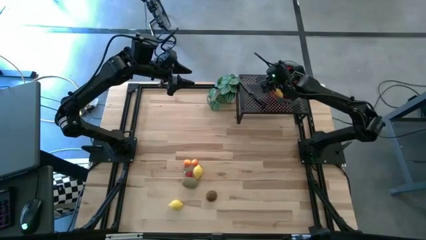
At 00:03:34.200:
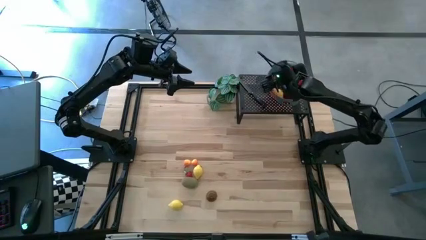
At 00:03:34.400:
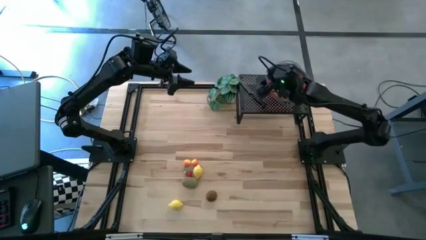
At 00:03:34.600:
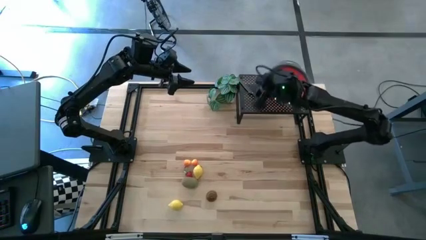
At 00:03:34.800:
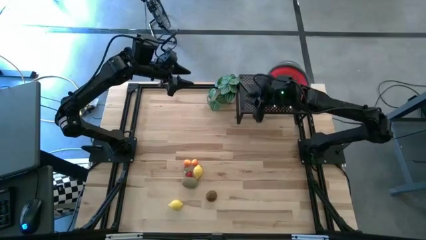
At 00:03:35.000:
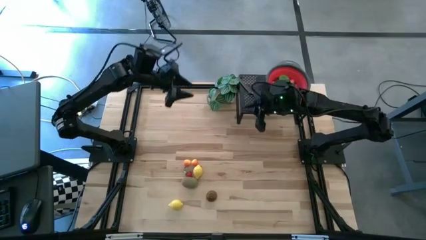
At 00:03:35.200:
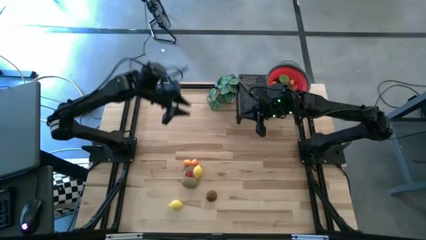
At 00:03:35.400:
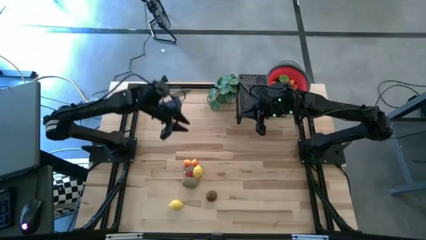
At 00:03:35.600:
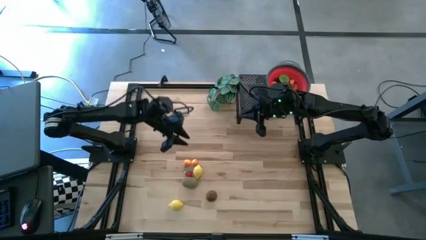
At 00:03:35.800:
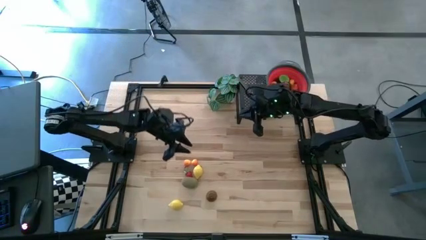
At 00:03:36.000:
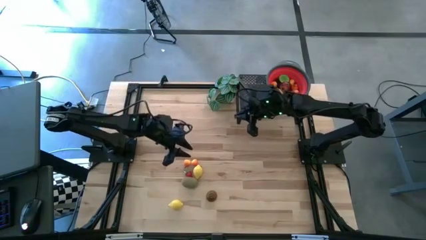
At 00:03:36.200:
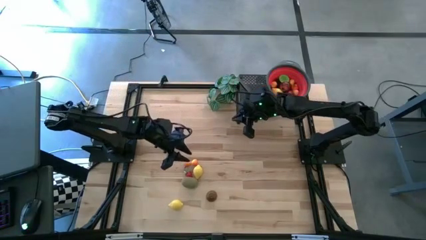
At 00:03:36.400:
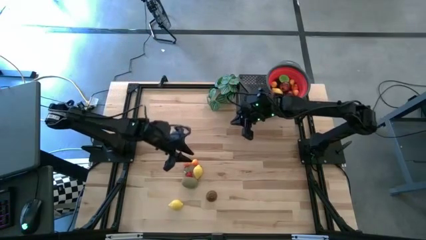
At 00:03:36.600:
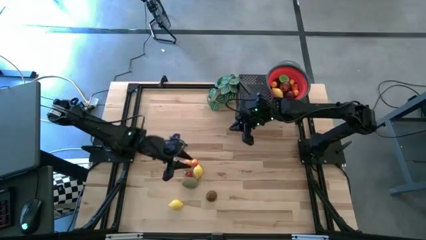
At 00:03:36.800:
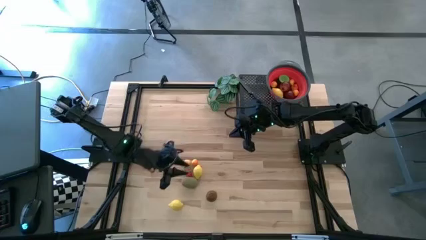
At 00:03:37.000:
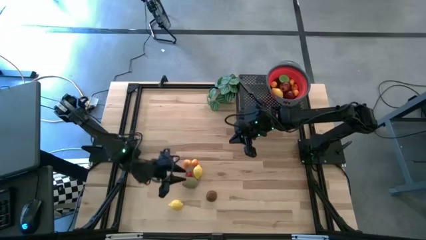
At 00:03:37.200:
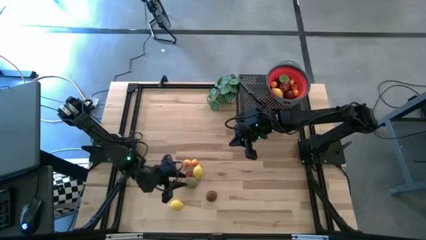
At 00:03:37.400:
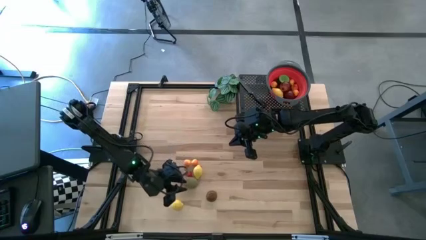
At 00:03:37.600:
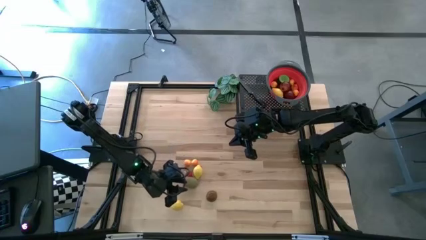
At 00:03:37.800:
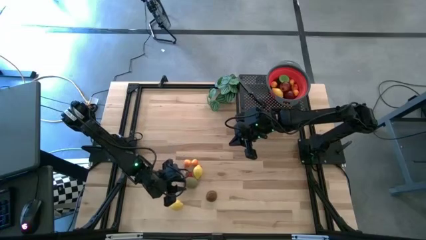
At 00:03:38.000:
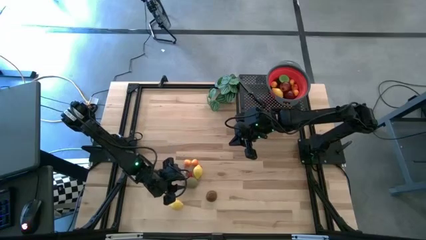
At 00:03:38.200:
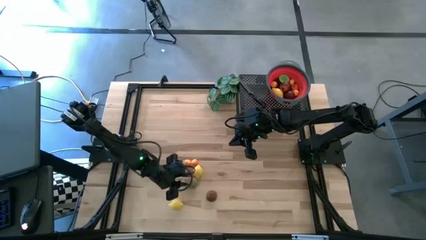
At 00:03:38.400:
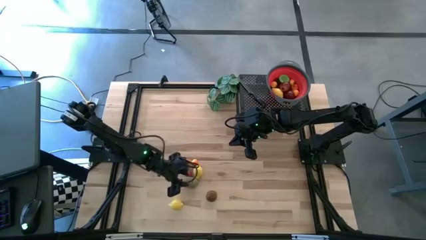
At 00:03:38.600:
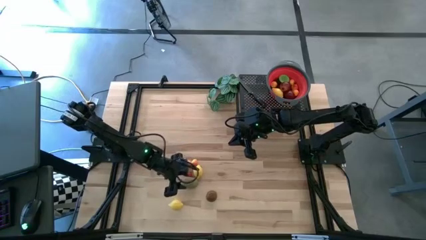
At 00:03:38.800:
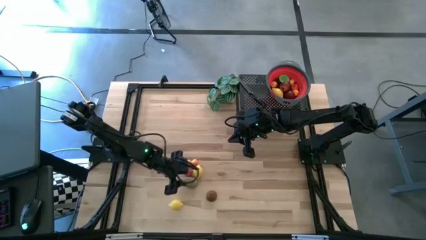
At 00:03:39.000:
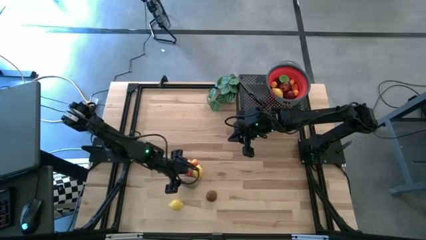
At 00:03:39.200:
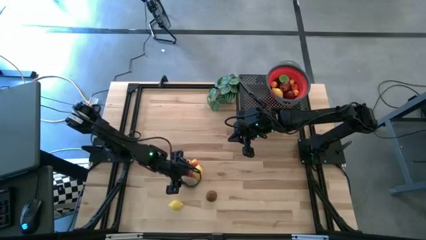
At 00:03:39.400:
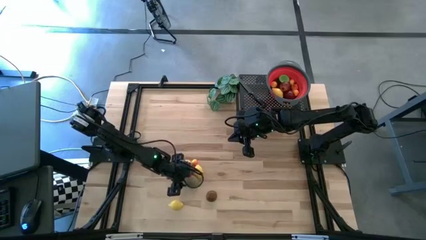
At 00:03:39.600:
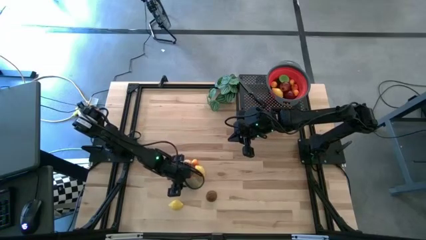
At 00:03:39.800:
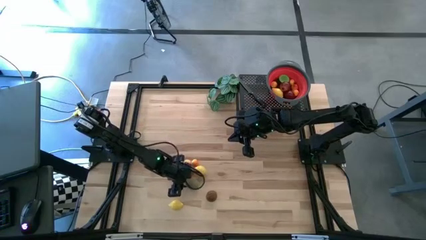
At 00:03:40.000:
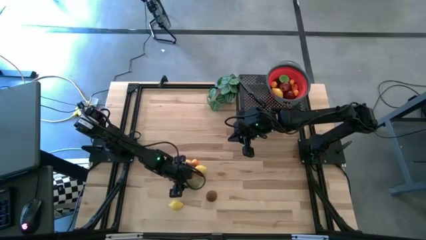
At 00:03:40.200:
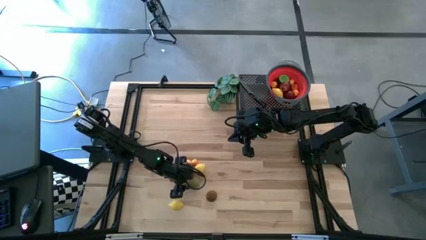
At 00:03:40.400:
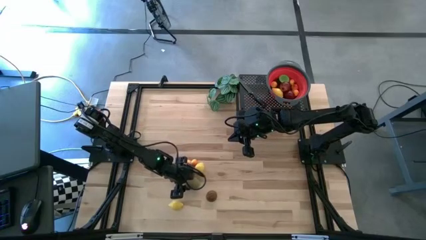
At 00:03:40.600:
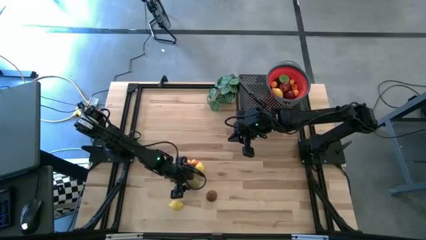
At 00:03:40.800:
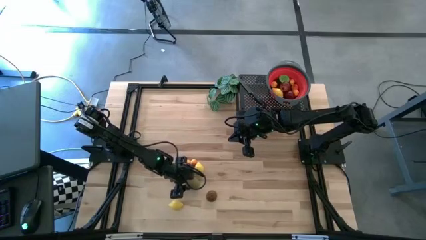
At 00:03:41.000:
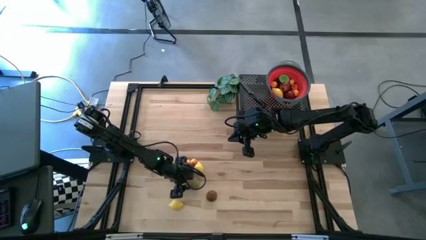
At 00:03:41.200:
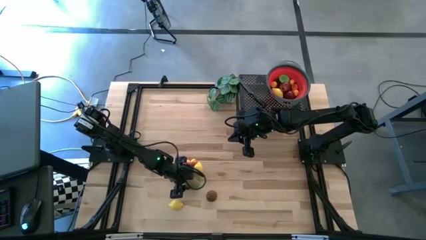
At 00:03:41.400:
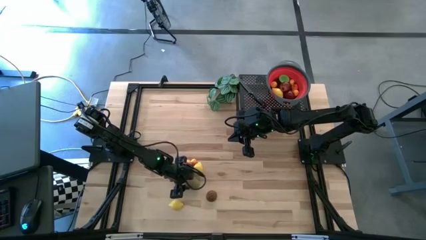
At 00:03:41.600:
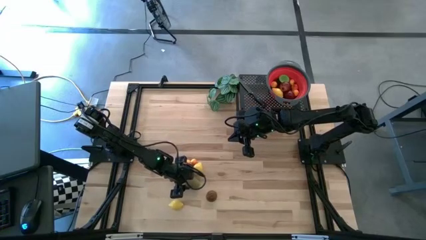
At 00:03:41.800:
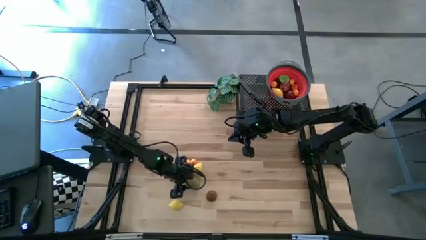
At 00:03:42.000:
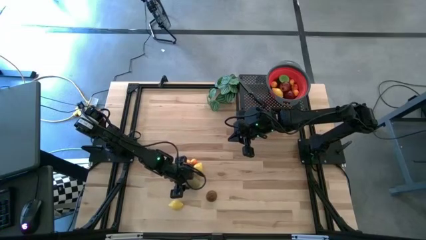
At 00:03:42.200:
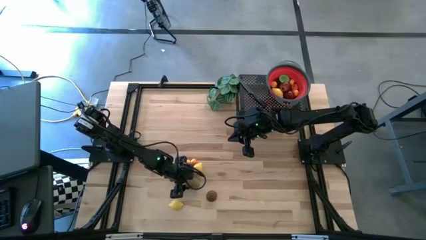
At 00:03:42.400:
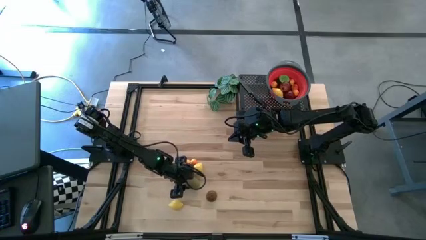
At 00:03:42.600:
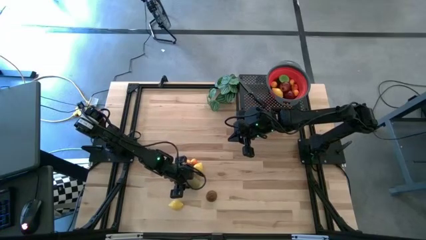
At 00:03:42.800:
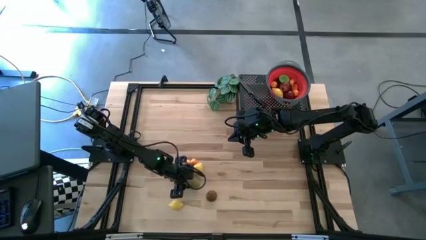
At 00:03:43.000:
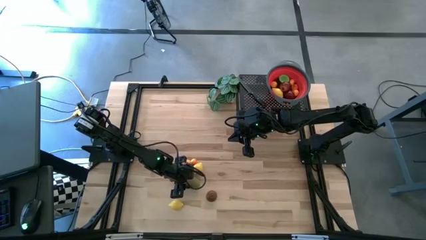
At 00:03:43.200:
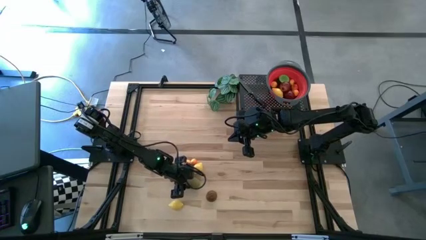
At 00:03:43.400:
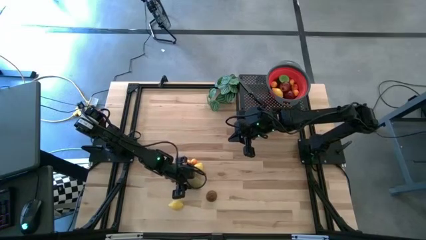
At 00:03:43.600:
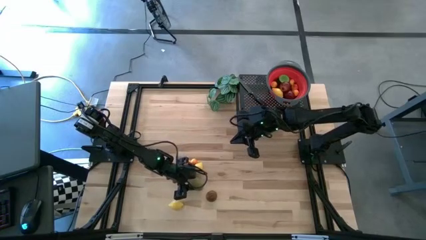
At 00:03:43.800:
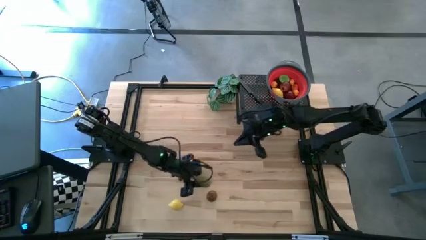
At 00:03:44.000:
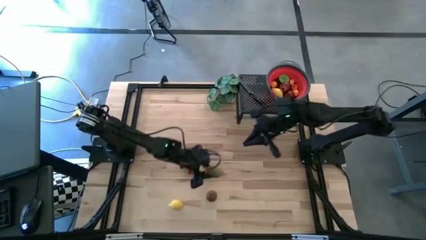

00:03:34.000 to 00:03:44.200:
Task: Pick & Place Fruit
Put the brown kiwi into the red strainer bowl

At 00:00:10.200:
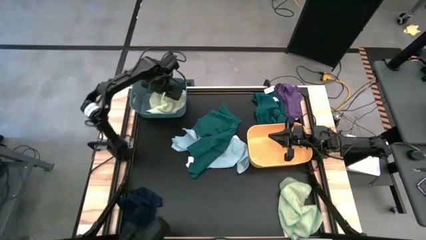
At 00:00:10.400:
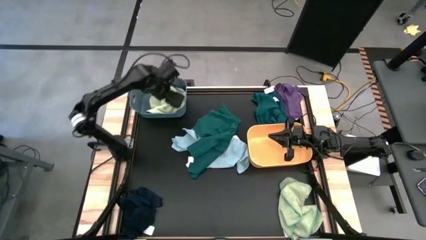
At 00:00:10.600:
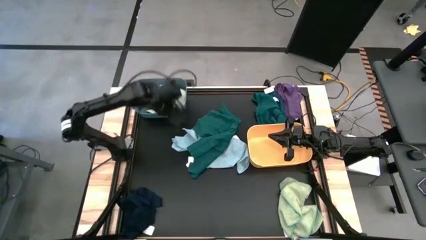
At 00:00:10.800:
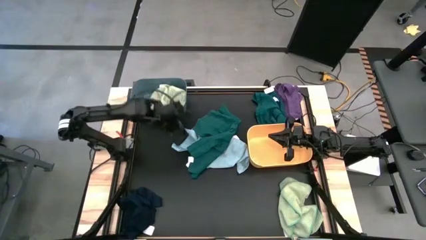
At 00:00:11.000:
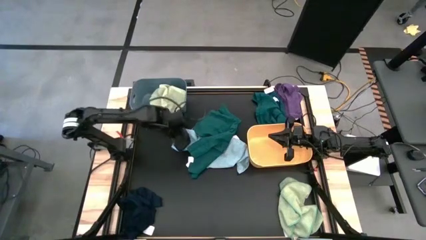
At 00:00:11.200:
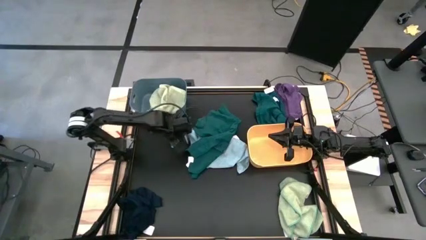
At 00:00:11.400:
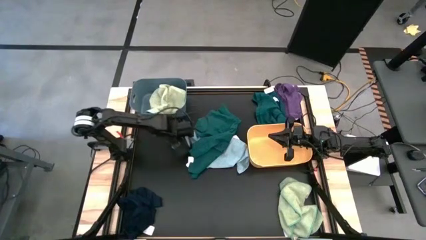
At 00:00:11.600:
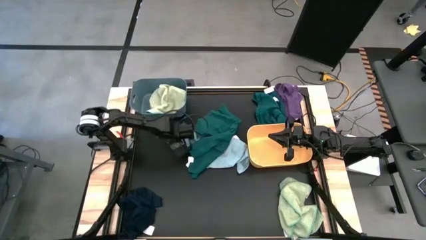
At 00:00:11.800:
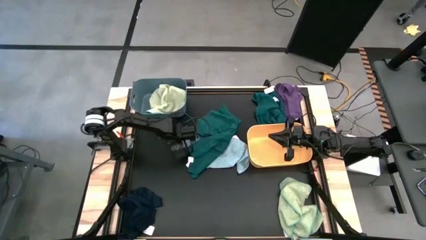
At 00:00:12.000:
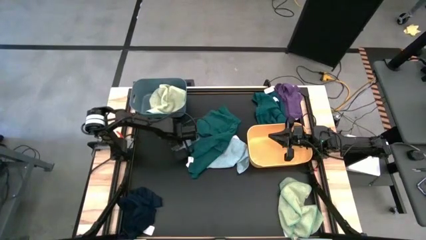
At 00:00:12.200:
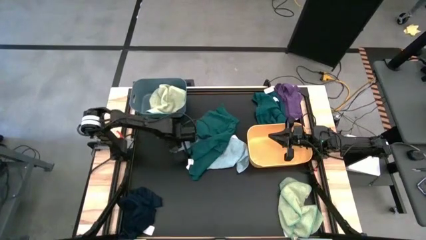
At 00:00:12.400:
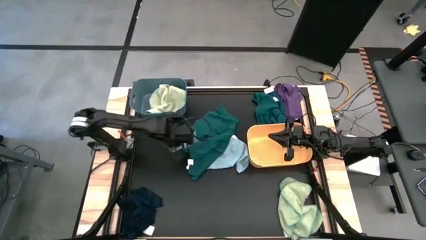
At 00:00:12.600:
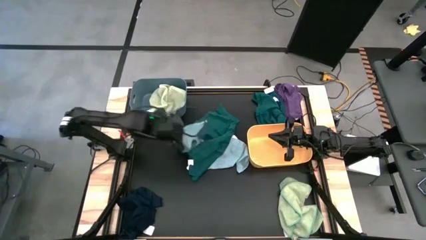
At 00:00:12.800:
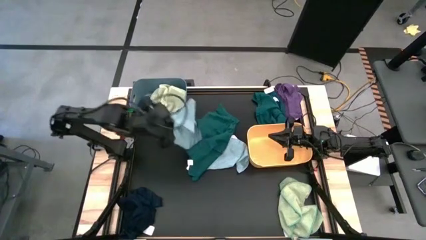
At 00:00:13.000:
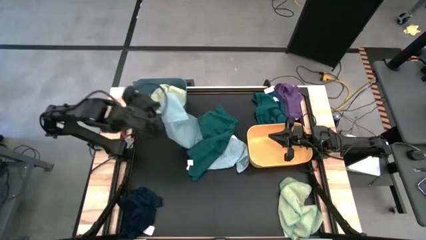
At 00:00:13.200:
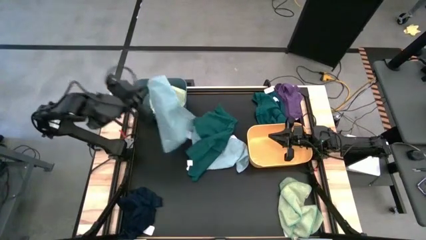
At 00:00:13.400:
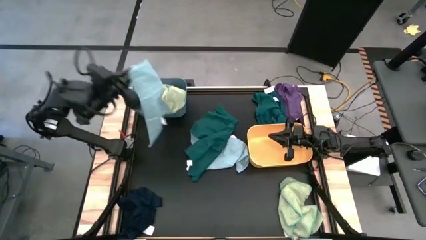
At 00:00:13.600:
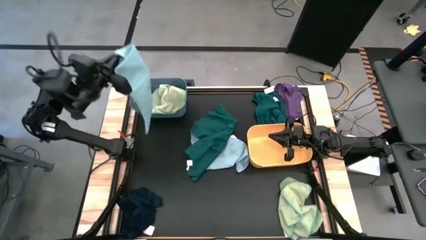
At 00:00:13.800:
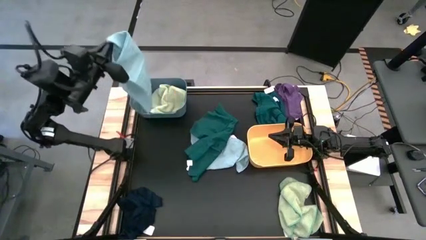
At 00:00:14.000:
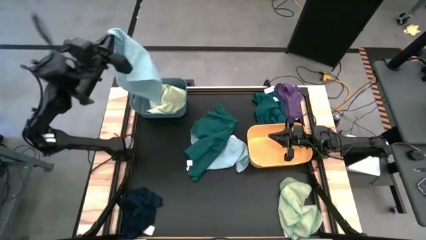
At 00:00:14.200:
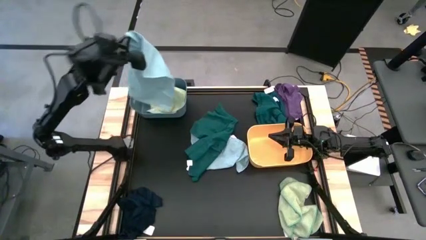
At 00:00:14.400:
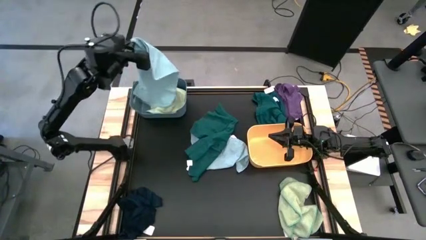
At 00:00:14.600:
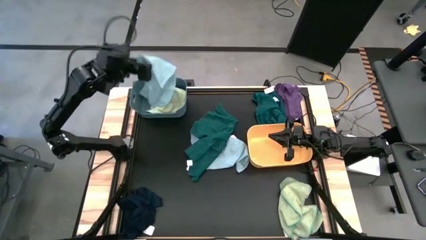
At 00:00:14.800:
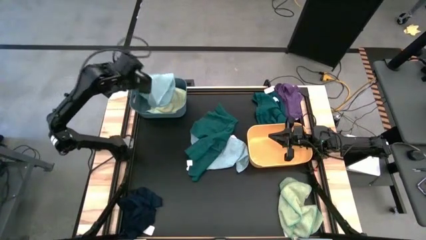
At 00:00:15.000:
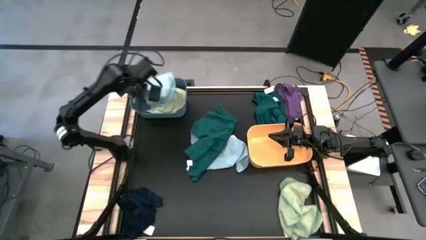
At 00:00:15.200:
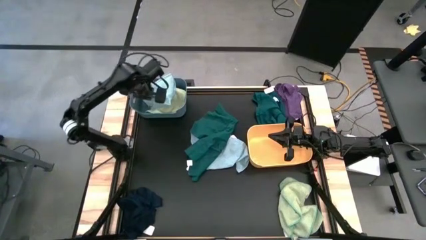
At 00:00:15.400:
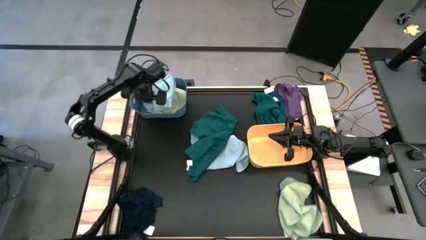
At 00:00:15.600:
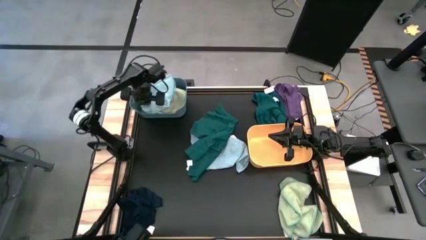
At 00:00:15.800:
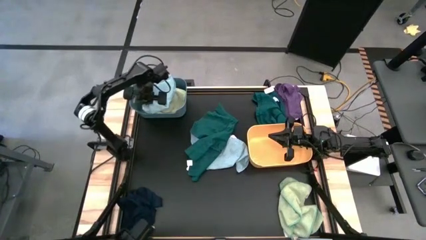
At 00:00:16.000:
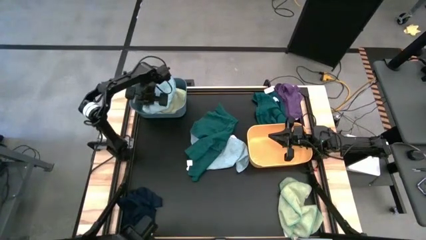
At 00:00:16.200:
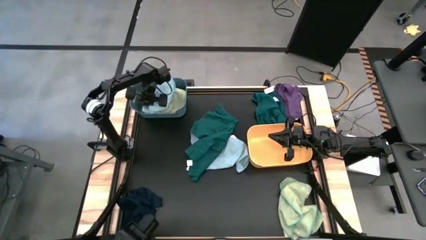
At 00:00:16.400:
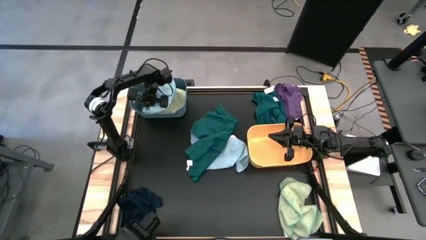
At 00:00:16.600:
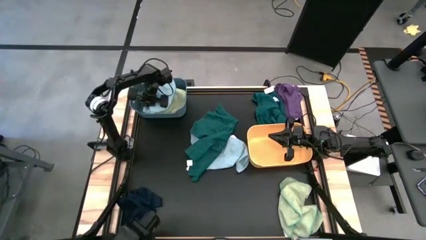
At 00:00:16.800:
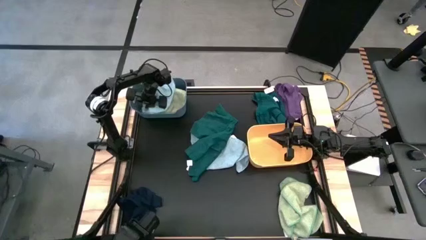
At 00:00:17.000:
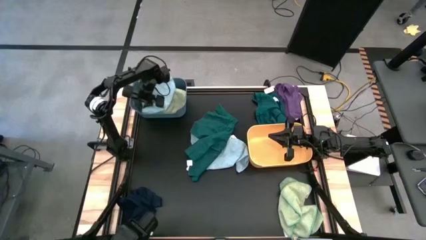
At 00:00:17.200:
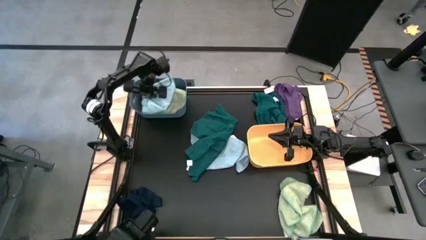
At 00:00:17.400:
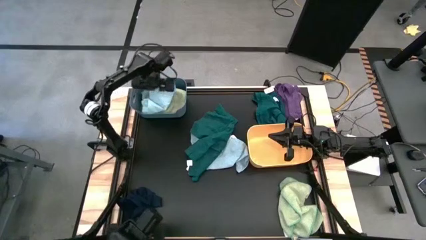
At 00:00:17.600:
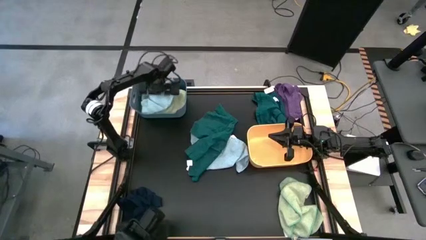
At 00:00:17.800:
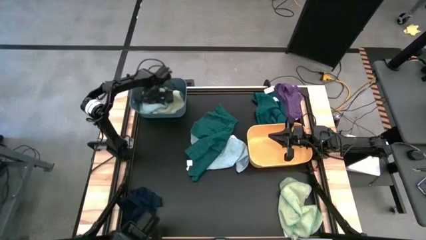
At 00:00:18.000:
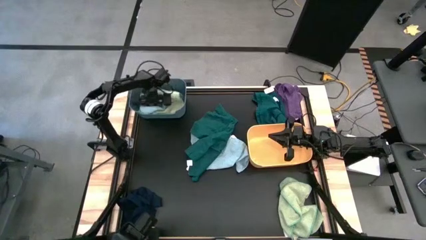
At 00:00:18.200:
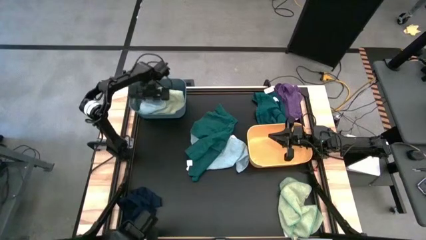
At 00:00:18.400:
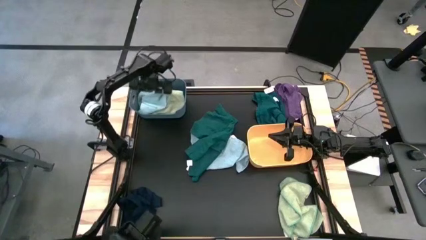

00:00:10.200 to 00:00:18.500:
Task: Sort towels by color in basket
Put the top light blue towel into the blue bin
